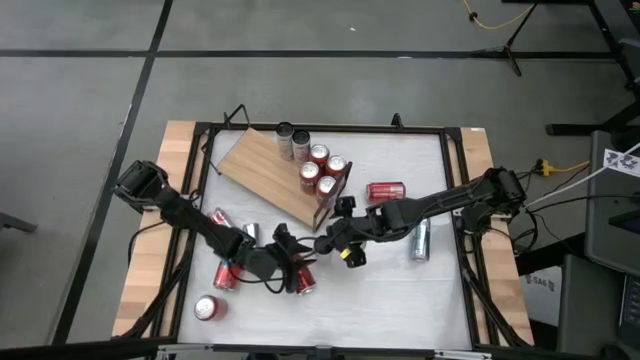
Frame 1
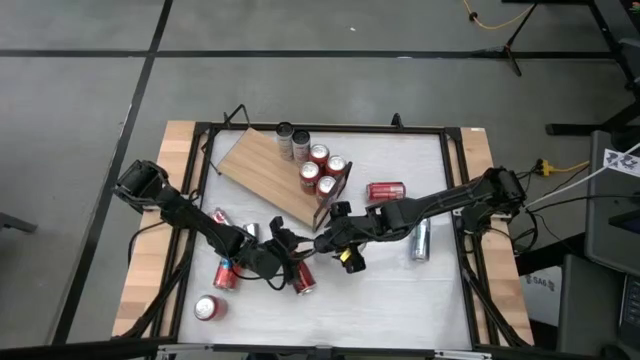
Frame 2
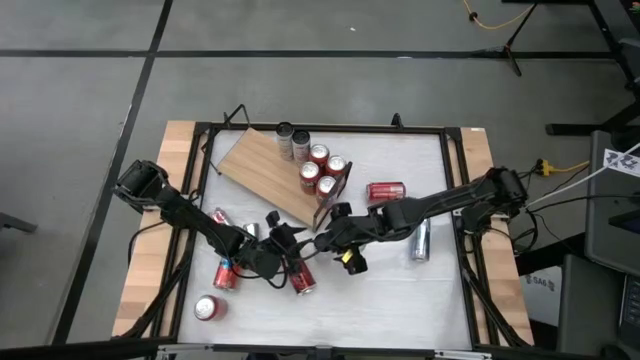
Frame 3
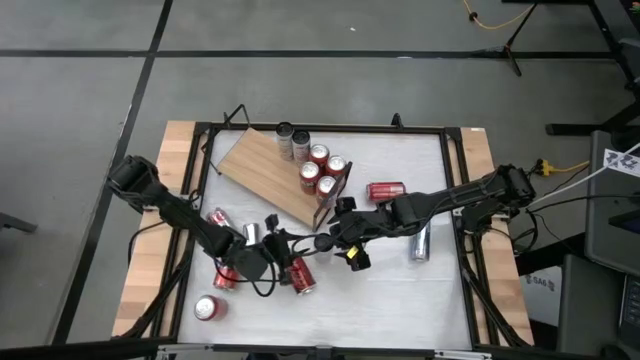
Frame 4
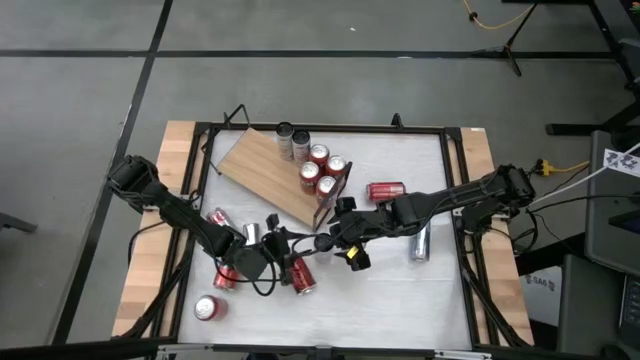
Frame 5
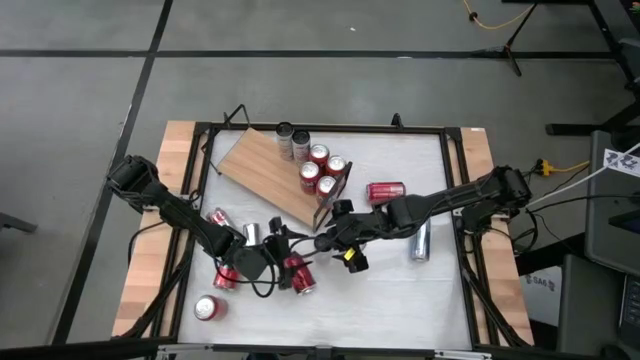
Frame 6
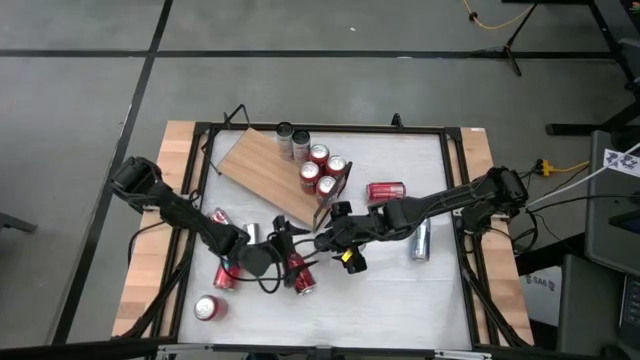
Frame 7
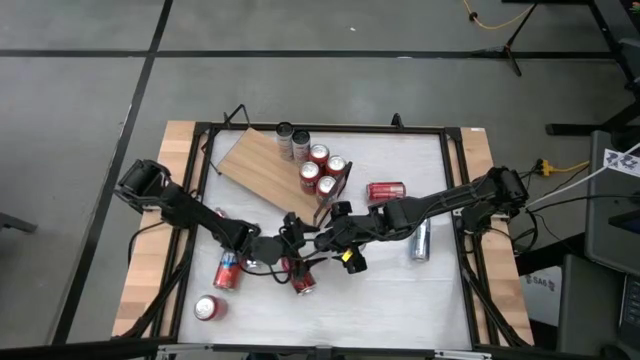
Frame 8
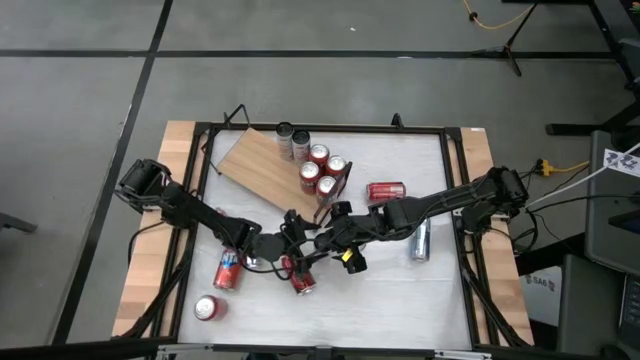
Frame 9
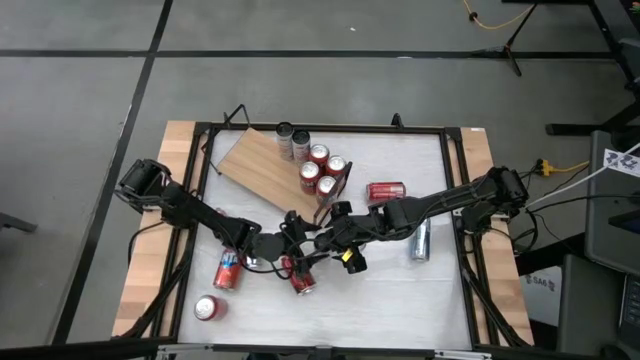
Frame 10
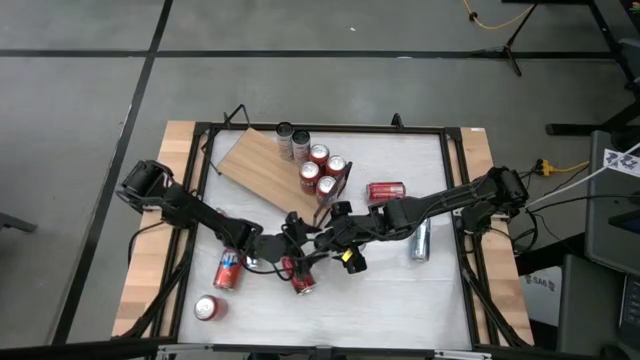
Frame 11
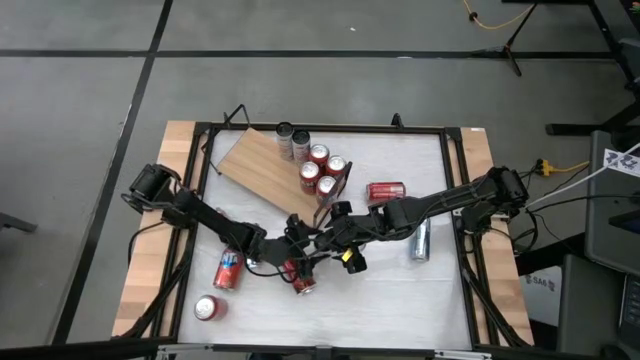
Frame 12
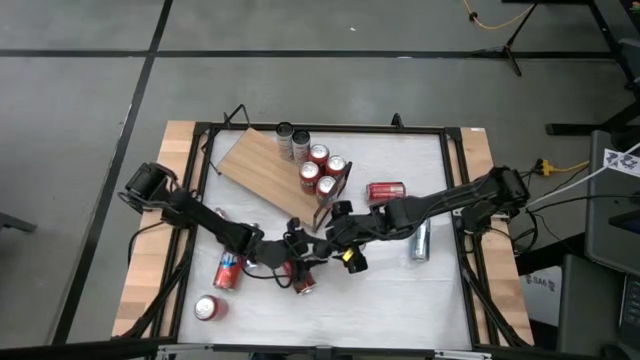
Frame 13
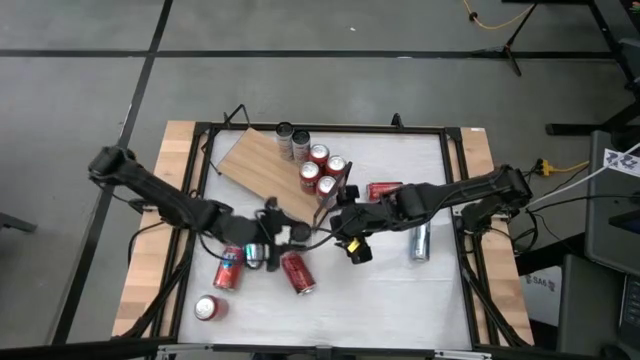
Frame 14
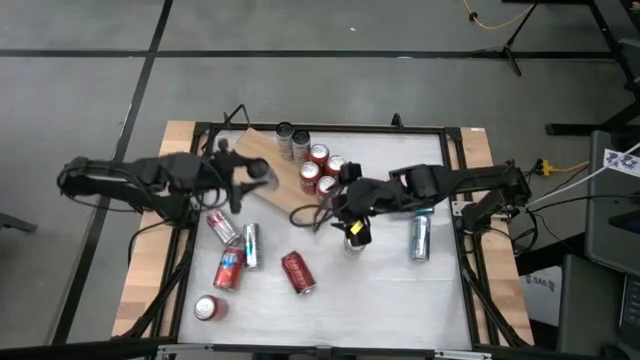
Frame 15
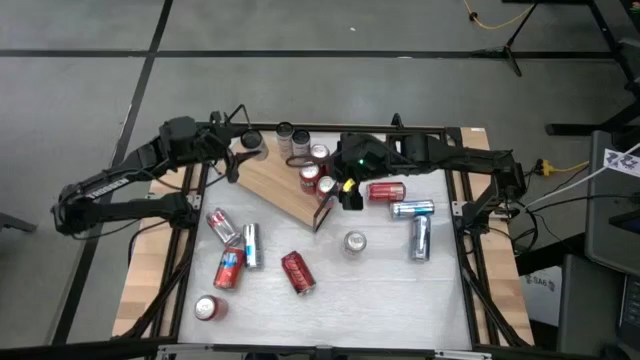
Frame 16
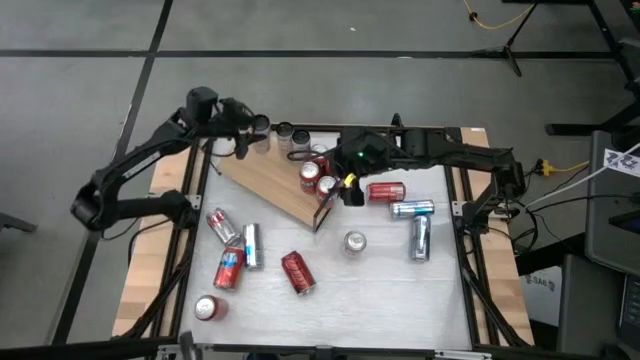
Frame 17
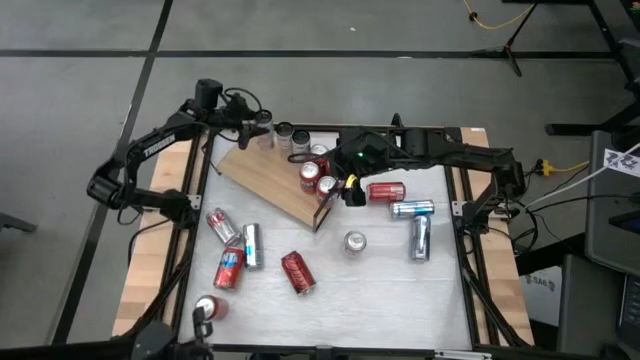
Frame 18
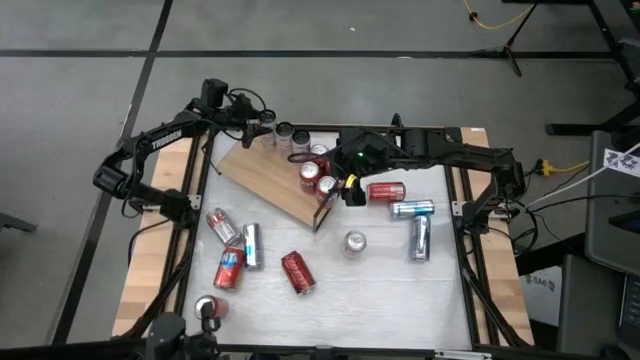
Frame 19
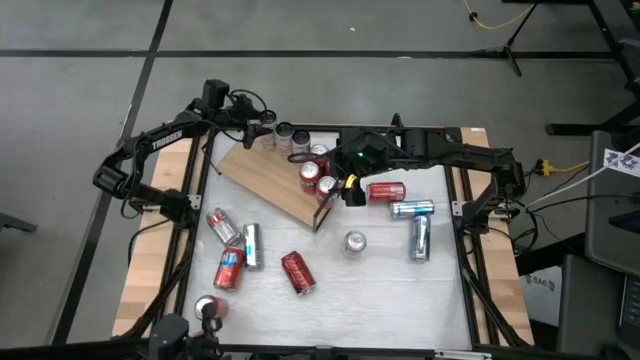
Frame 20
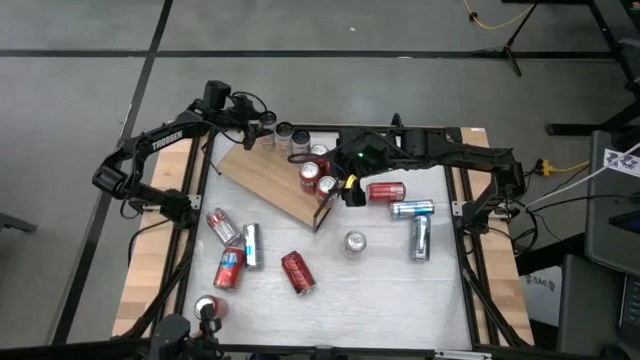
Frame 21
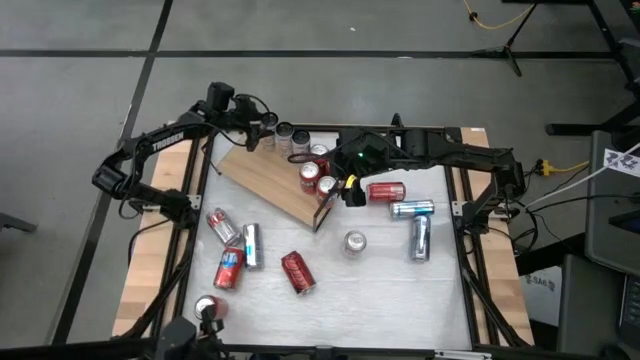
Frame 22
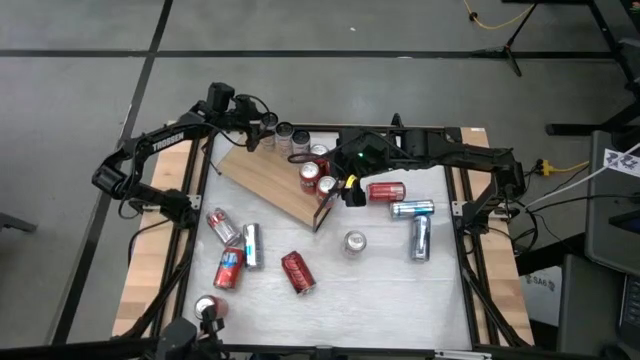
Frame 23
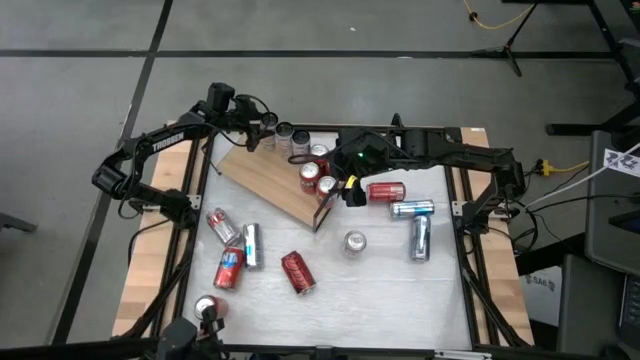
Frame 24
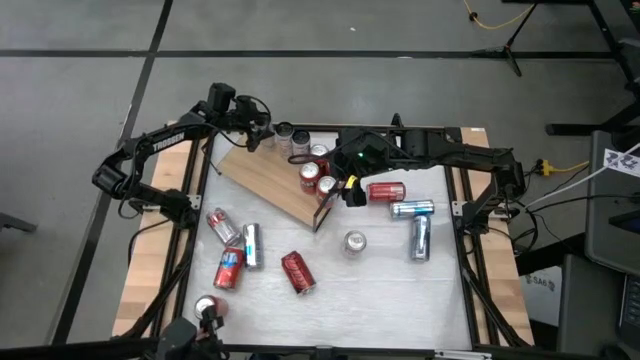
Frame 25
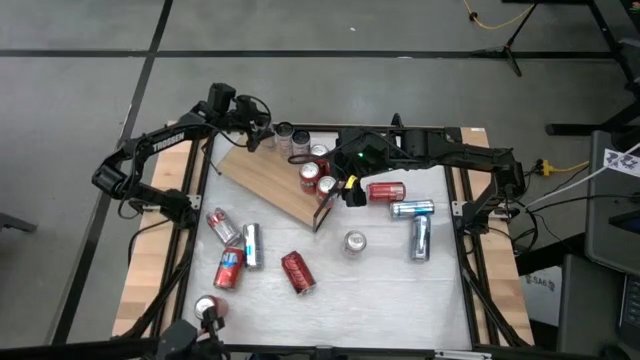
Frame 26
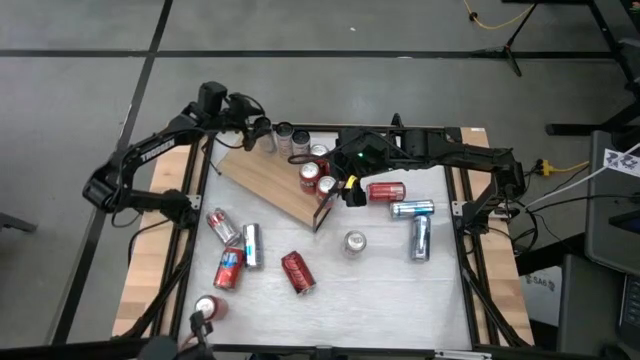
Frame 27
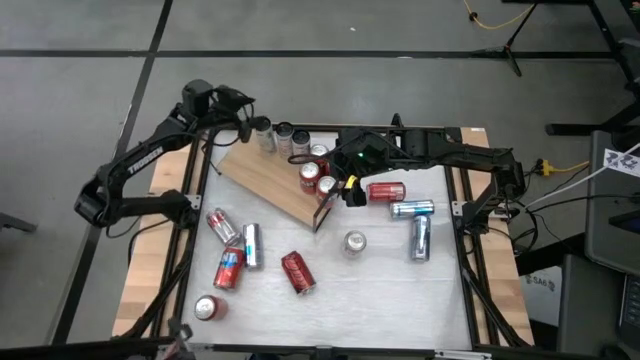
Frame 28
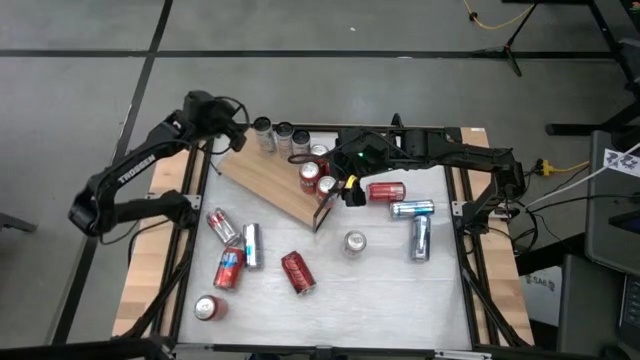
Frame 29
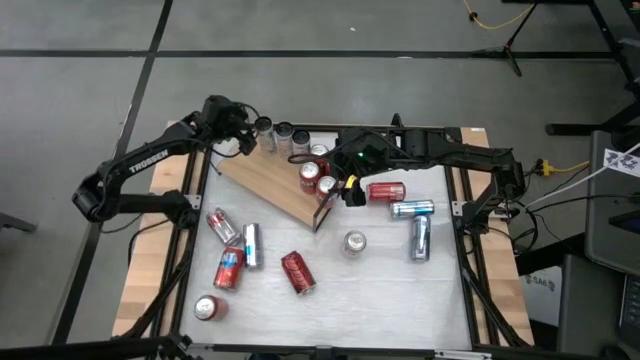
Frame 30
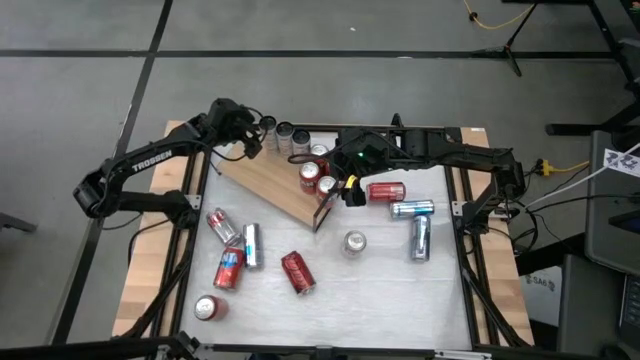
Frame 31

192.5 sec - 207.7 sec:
Task: Pick and place cans onto a shelf
Put the pink and white soda can on the shelf aligned with the other right pink and white soda can

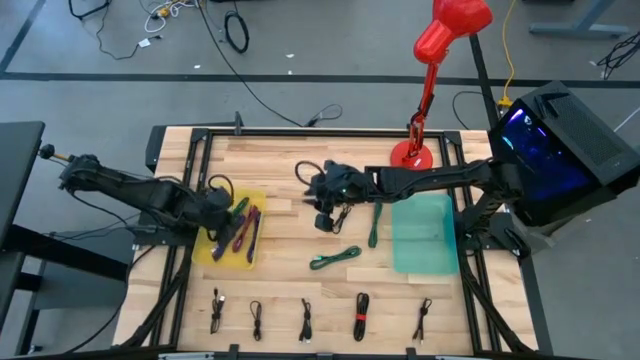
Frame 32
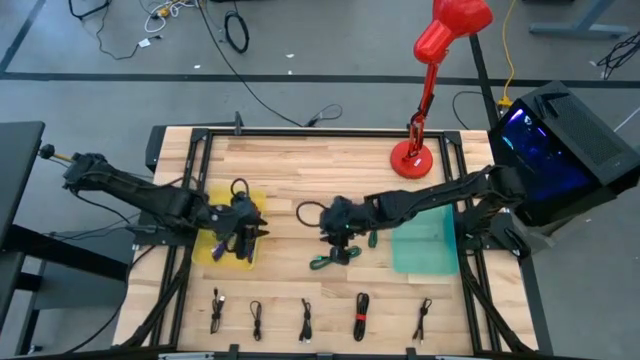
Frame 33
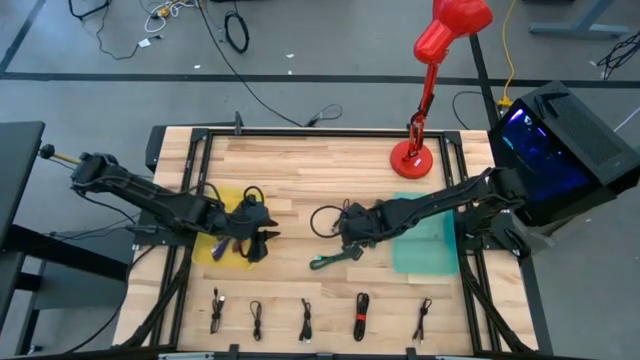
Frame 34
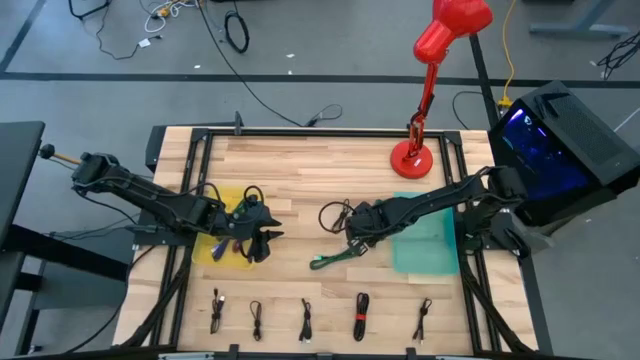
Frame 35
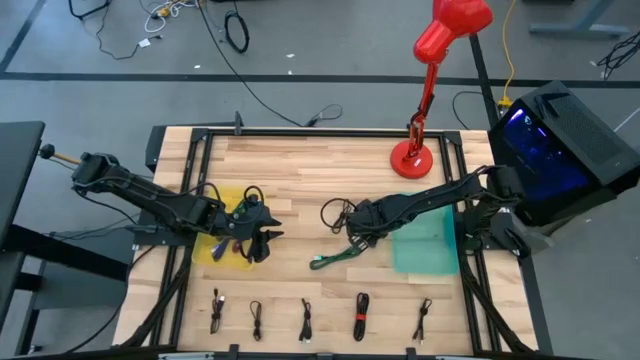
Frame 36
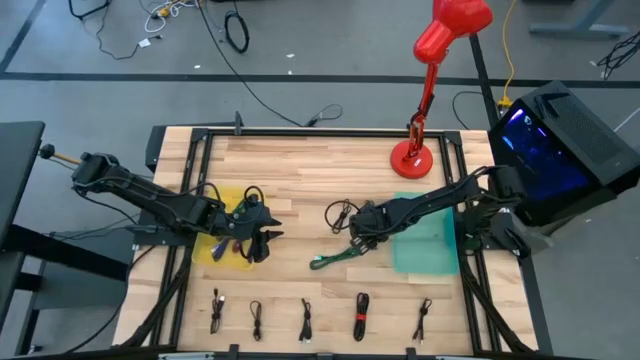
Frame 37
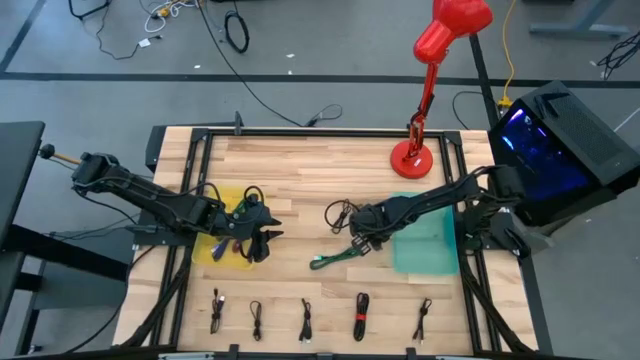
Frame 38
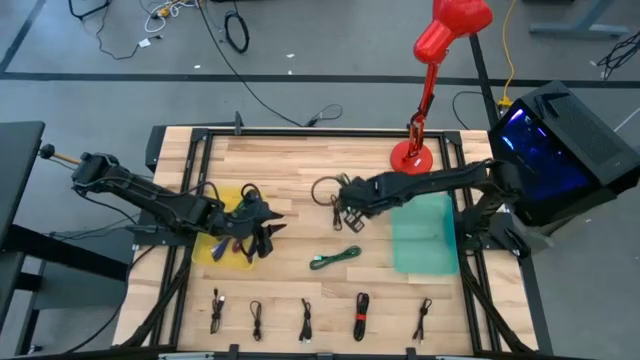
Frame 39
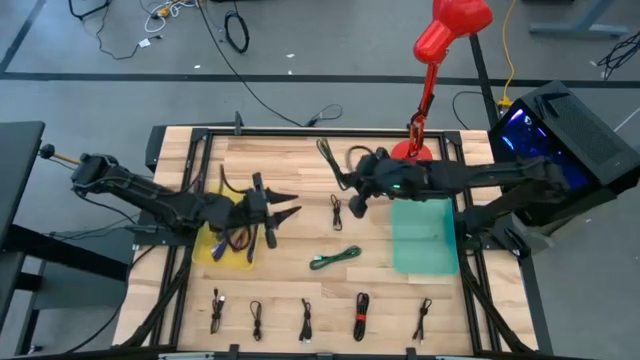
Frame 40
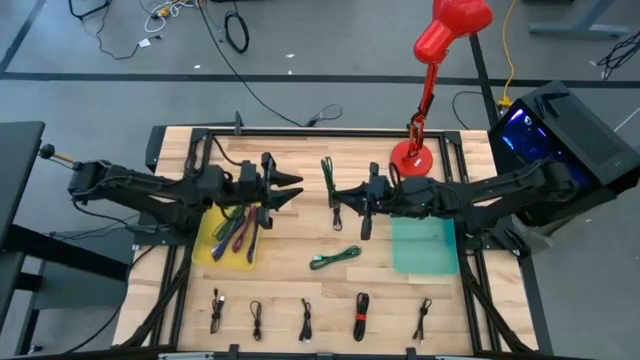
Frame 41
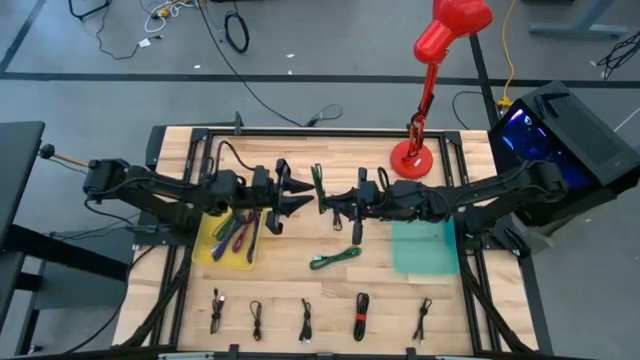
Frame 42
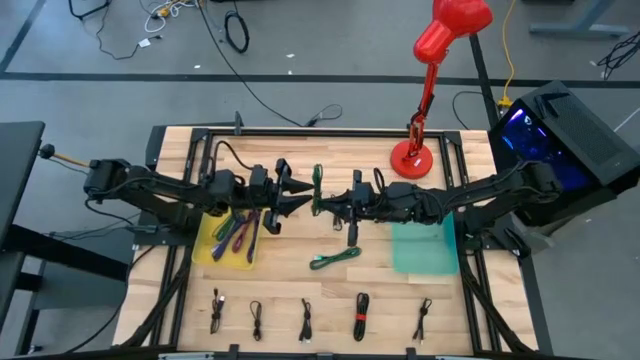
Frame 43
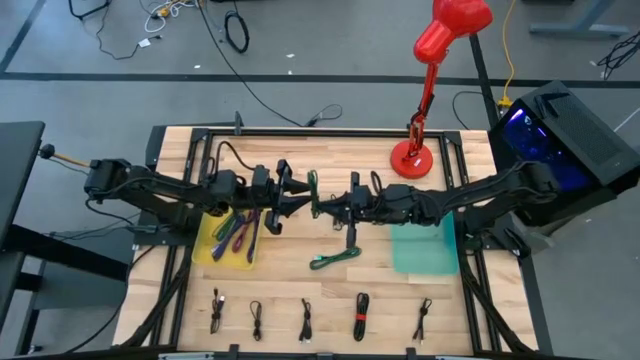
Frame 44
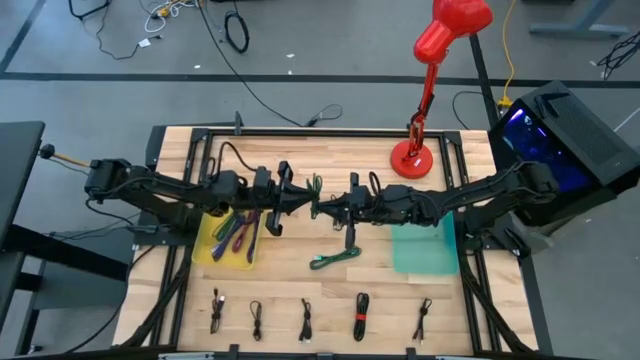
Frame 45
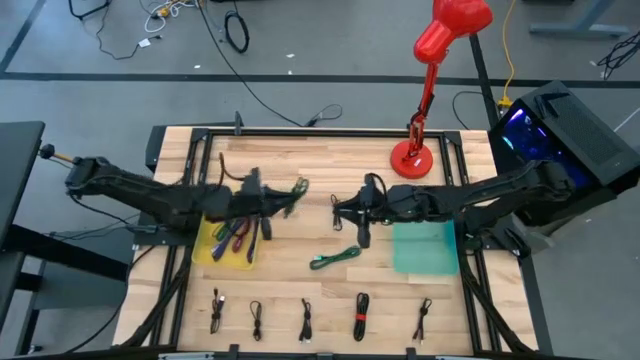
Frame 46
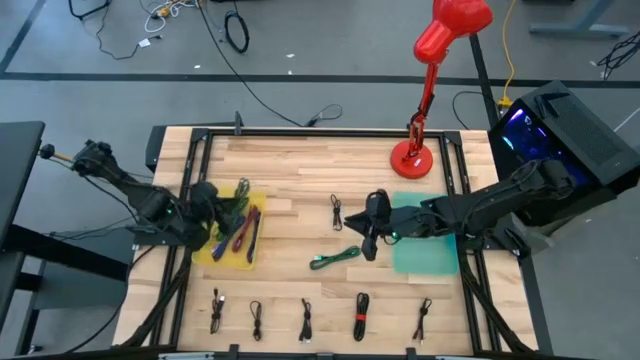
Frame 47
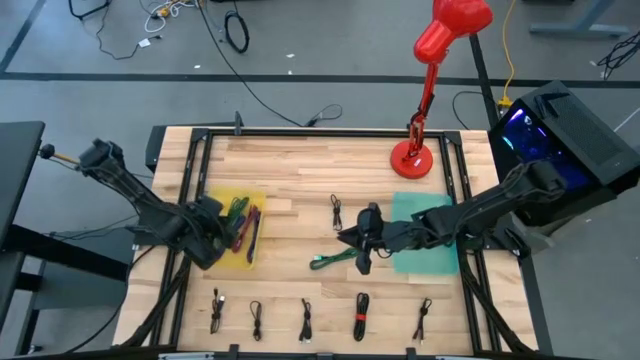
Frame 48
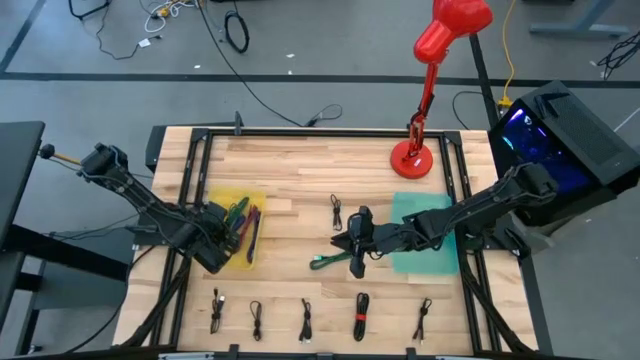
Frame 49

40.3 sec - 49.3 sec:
Task: Pick & Place USB Port
Put the black and green charger cable into the yellow bin
